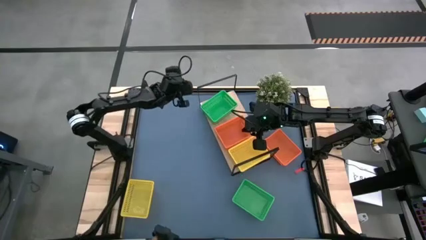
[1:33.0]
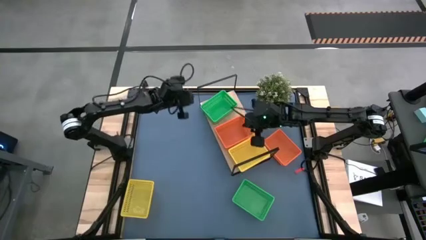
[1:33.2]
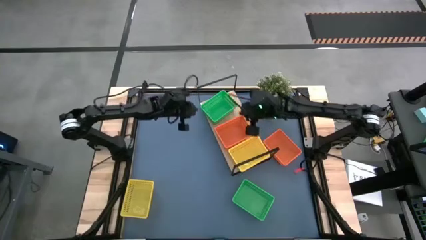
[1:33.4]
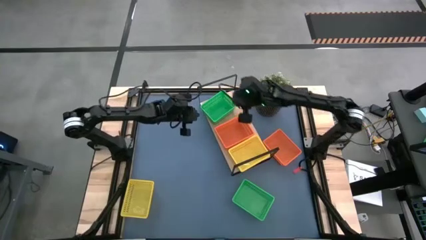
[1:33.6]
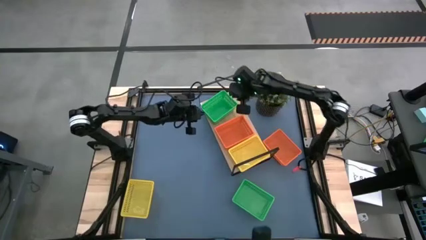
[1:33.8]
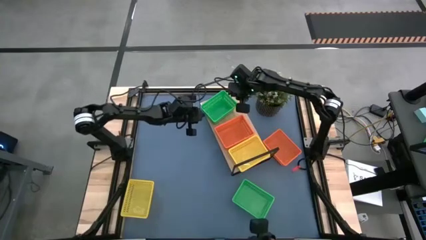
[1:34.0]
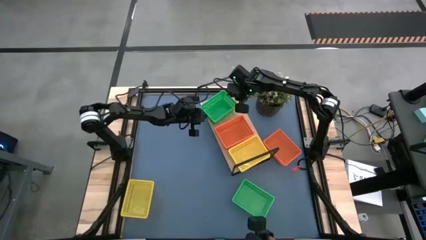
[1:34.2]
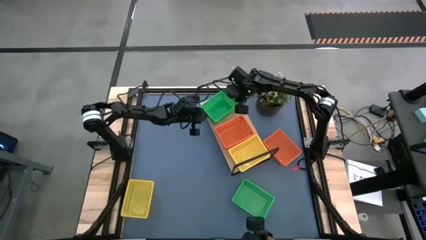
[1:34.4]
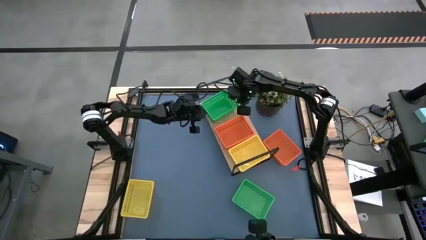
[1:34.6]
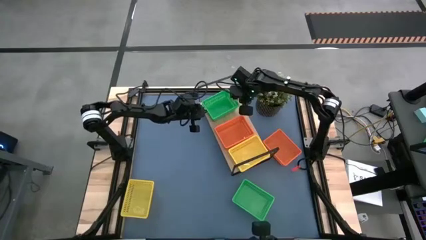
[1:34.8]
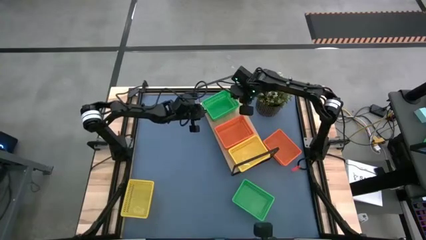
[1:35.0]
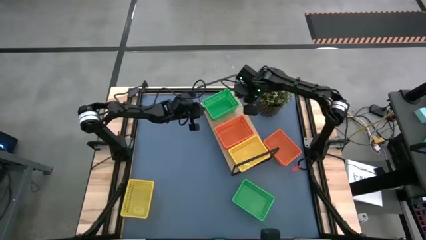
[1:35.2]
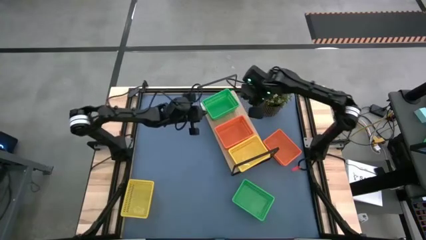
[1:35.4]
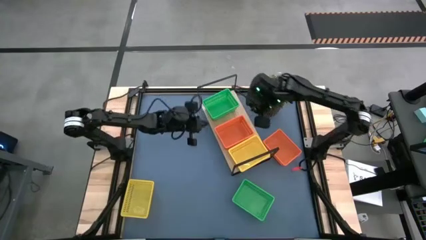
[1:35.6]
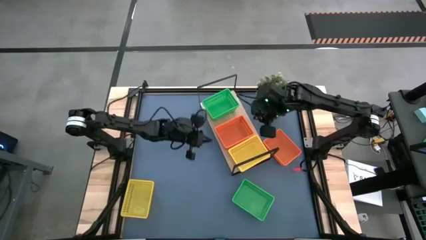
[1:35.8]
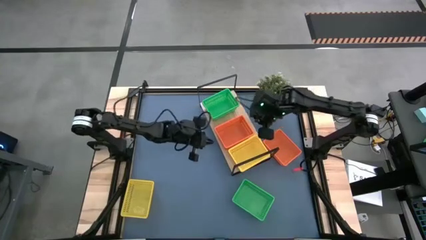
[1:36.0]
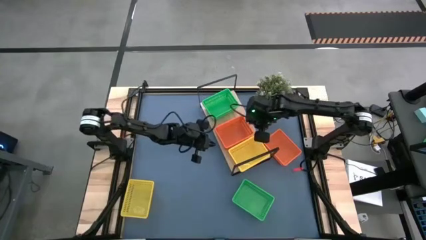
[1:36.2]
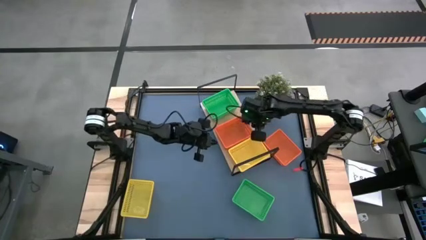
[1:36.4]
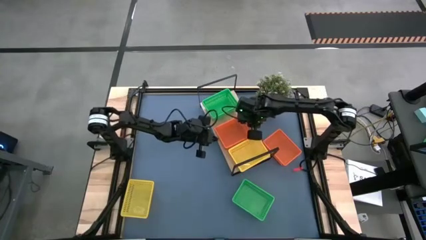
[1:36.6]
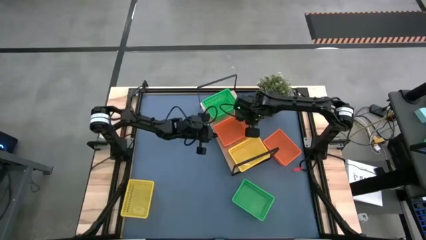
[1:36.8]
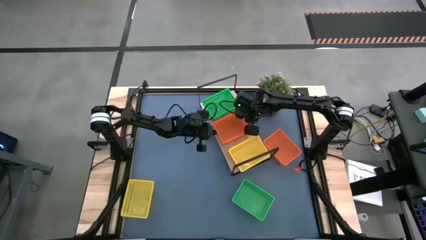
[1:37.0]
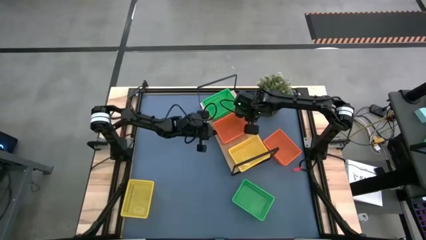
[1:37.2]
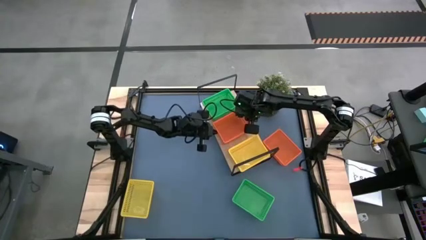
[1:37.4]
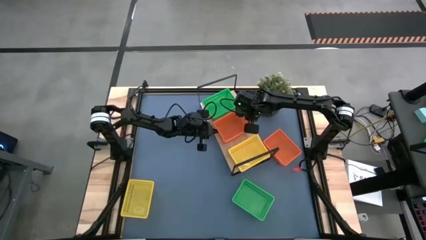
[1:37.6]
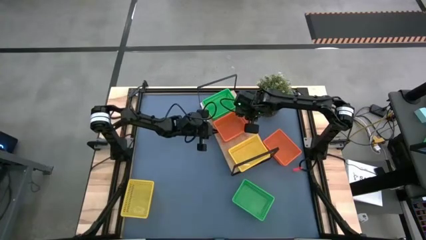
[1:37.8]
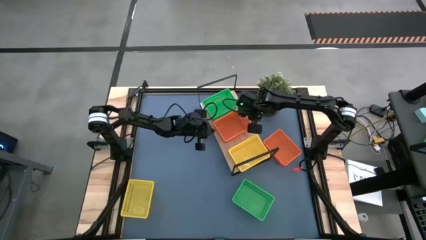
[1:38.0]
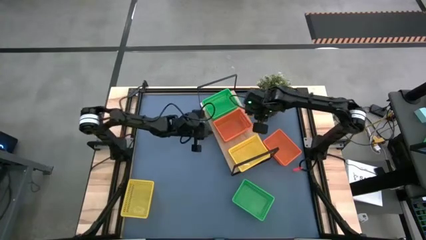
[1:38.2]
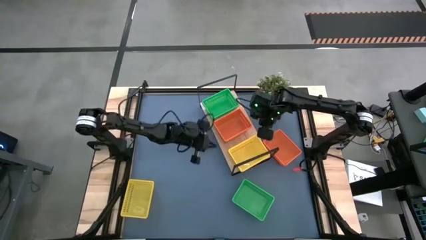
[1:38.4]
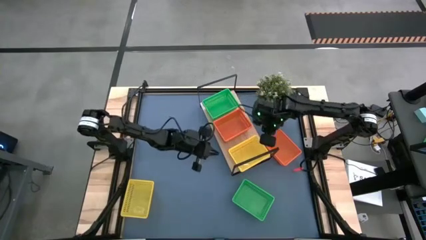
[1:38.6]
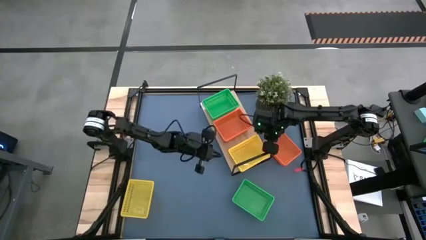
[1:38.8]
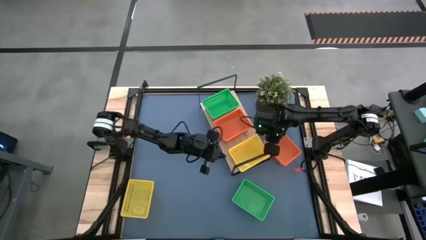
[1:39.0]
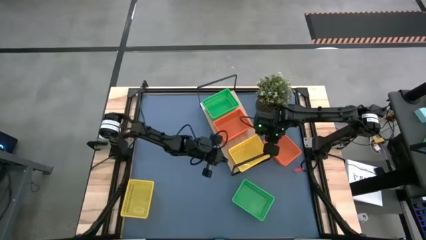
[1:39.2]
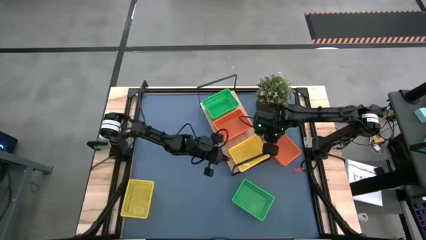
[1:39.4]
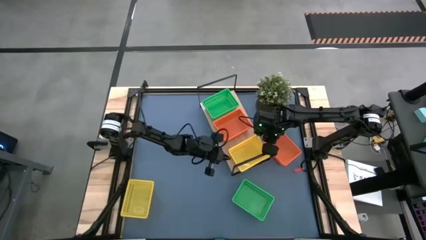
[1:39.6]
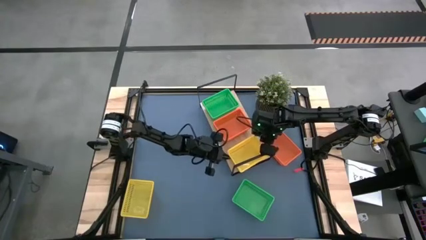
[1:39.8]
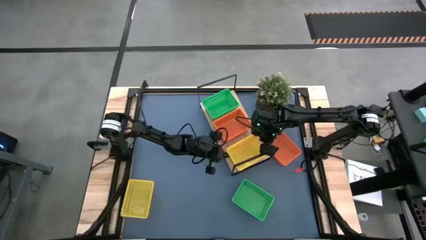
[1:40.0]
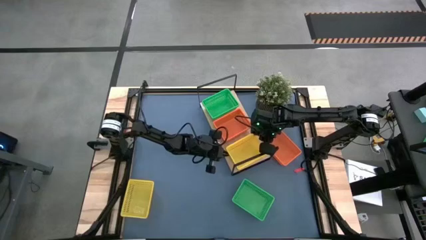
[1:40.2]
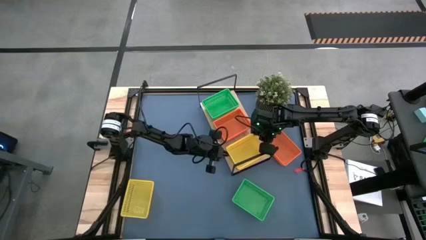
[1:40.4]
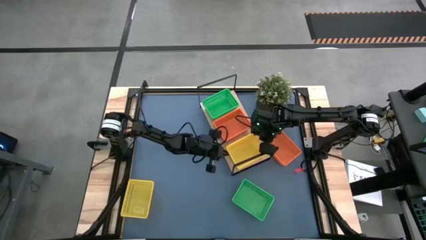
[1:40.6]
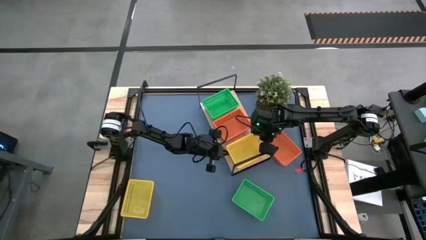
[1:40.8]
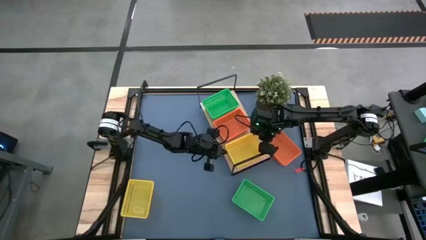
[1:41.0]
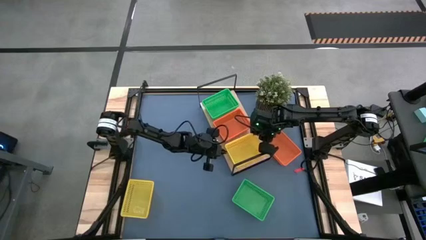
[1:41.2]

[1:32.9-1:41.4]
Task: Stack baskets on shelf by color
Adjust the stacked bins on the shelf

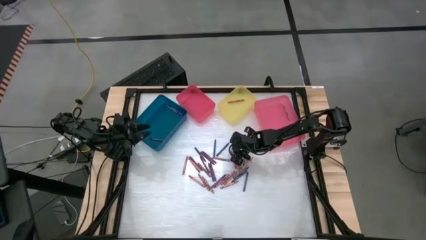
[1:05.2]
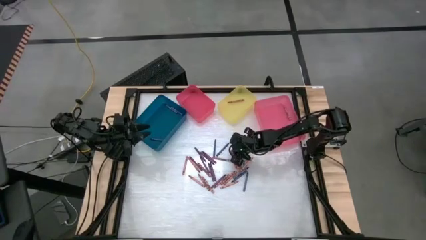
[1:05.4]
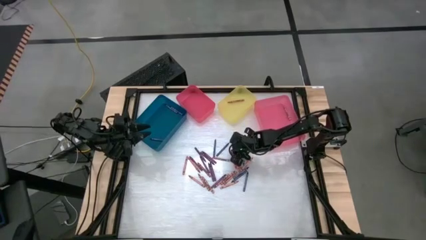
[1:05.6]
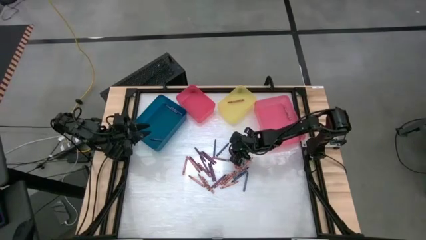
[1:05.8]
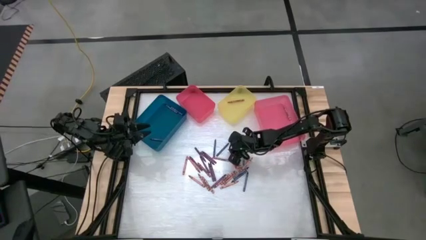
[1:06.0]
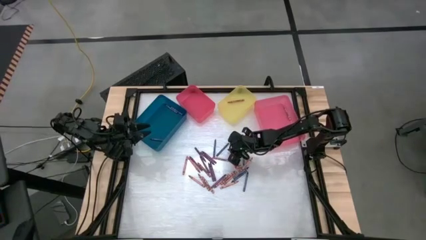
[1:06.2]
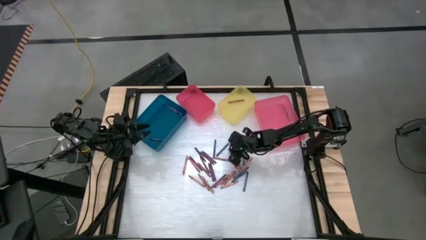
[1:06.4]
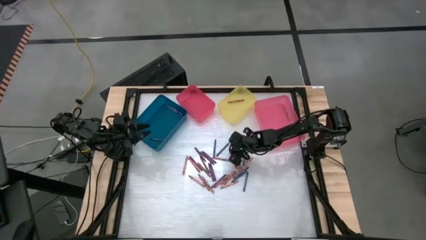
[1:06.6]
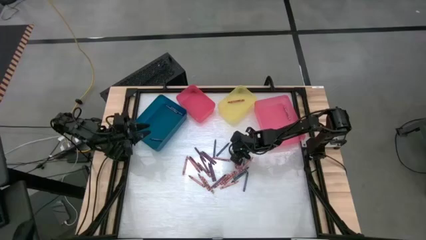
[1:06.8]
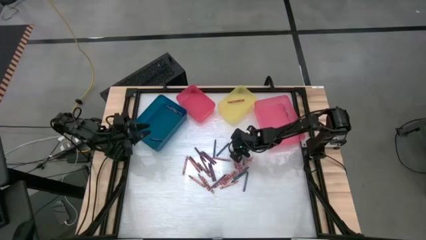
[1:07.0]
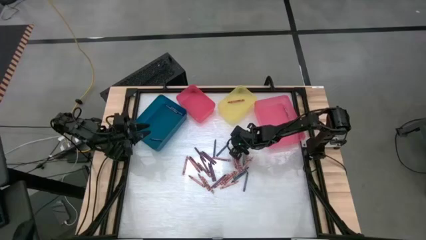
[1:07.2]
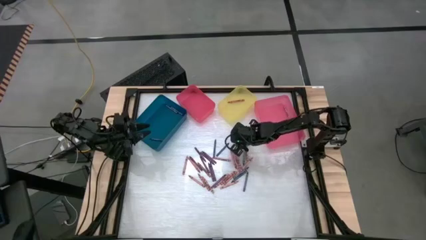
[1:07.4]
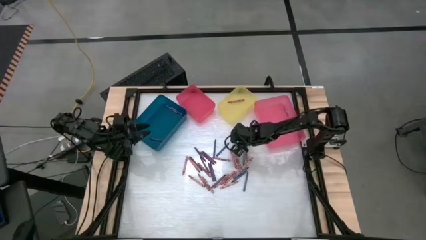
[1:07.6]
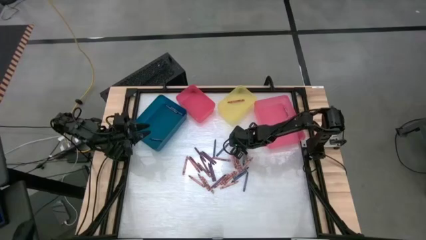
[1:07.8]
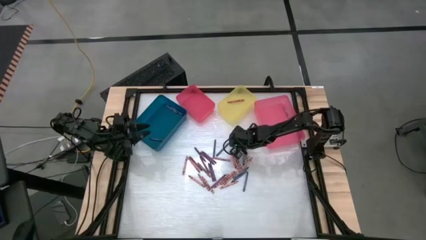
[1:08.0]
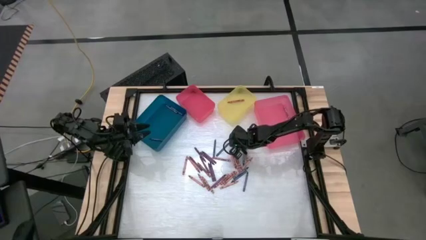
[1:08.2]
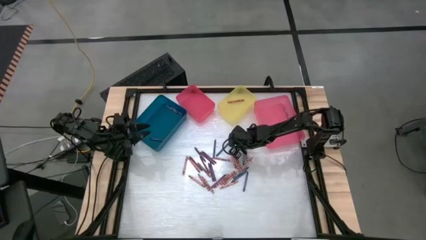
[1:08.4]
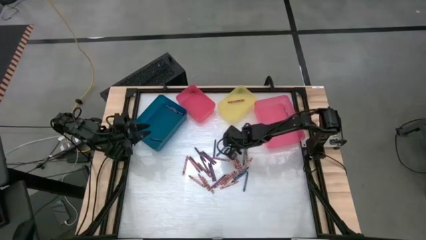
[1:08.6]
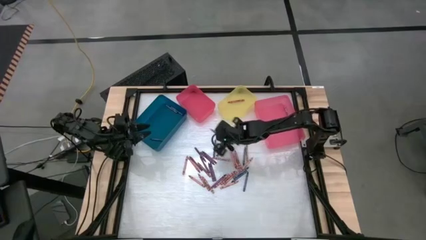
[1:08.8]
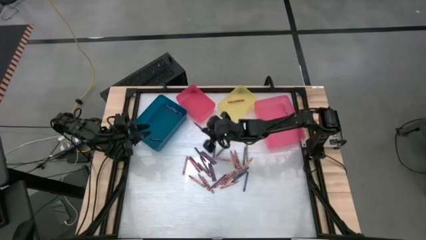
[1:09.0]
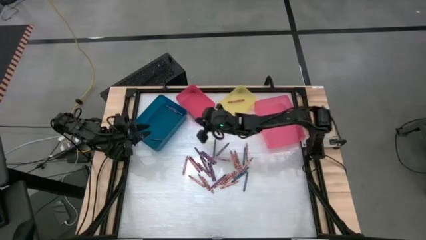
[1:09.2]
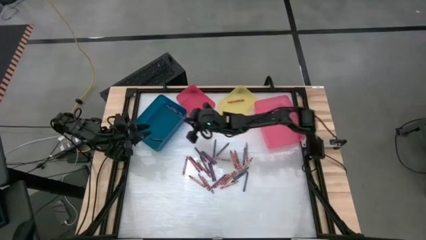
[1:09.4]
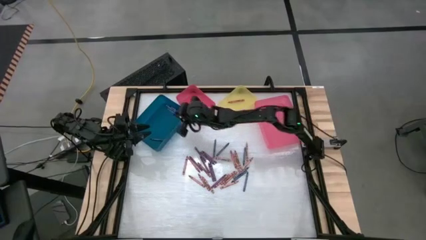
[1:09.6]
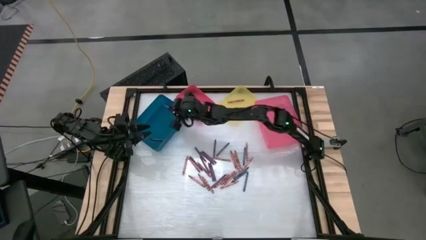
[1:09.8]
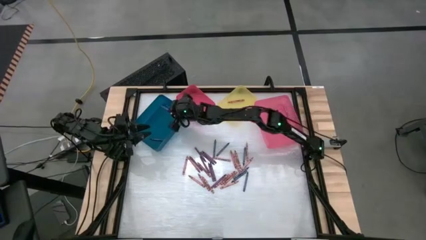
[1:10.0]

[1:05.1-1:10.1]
Task: Sort crayons
Put the blue crayon into the blue bin
